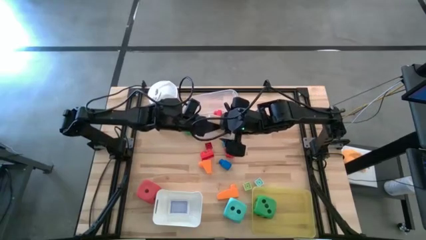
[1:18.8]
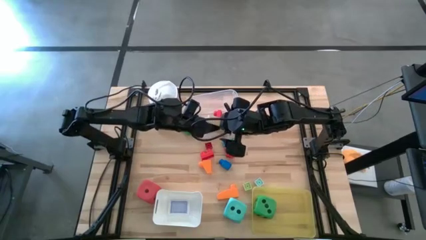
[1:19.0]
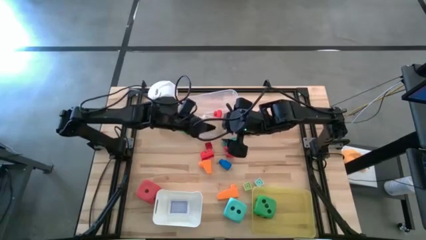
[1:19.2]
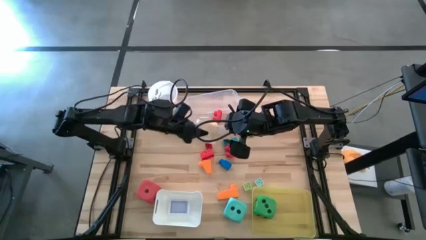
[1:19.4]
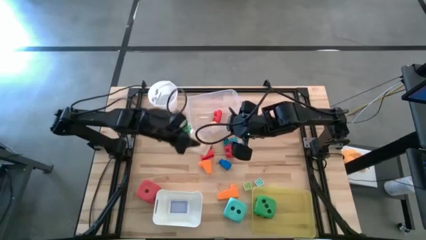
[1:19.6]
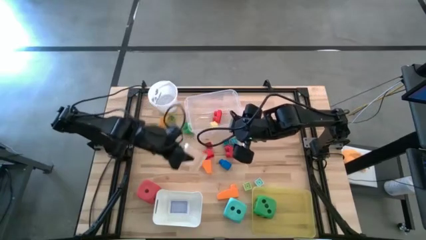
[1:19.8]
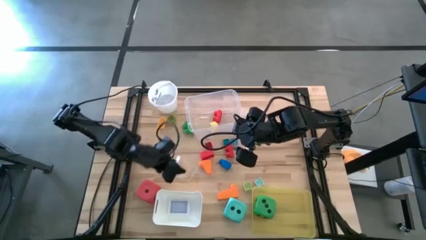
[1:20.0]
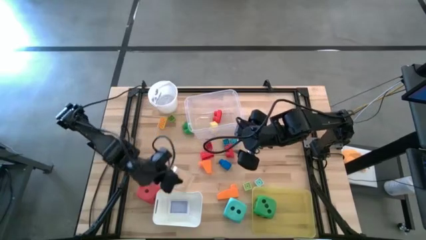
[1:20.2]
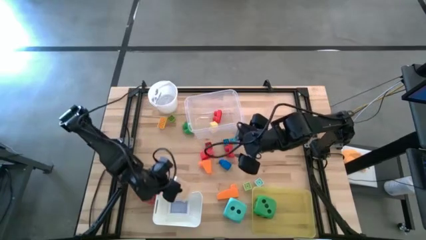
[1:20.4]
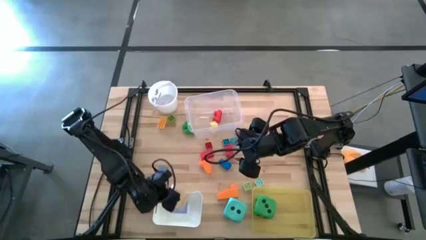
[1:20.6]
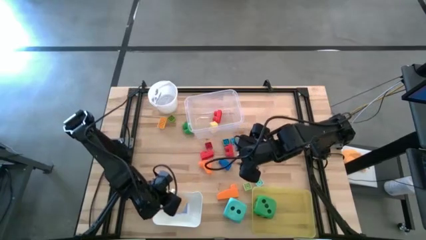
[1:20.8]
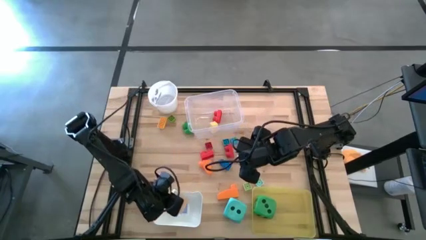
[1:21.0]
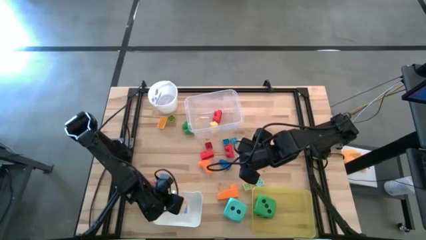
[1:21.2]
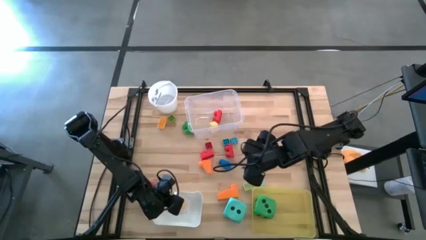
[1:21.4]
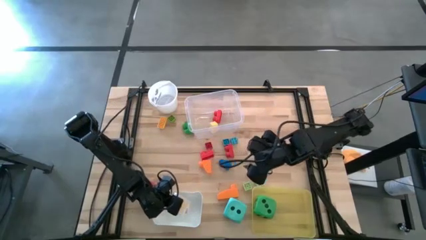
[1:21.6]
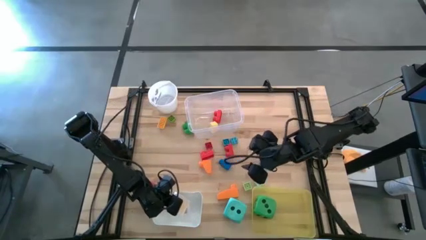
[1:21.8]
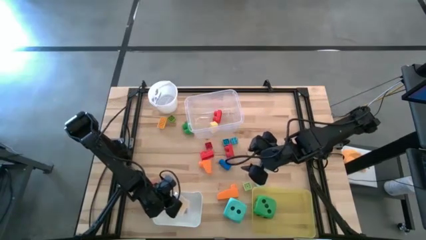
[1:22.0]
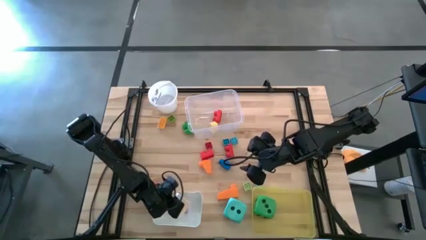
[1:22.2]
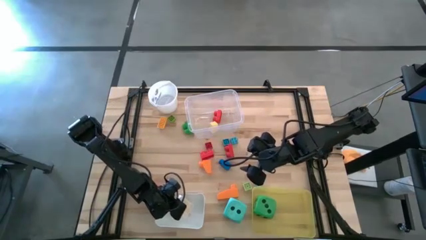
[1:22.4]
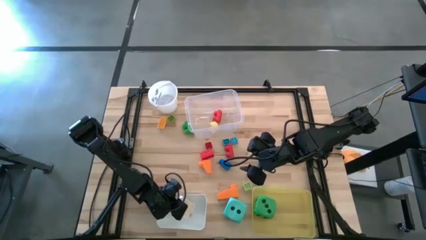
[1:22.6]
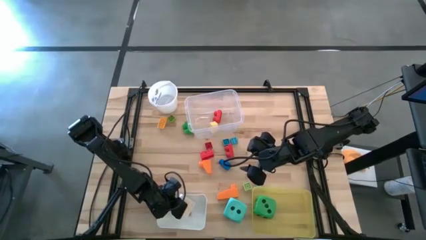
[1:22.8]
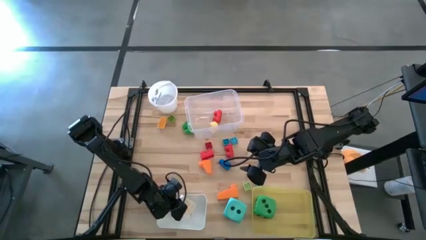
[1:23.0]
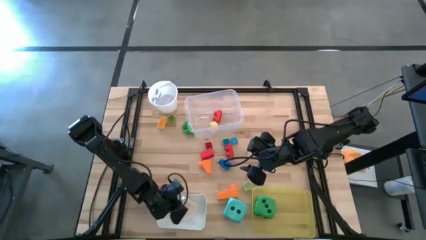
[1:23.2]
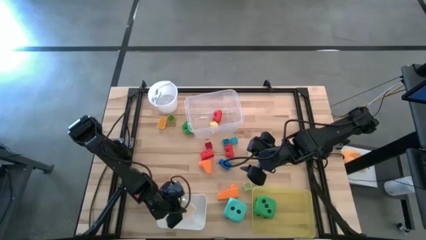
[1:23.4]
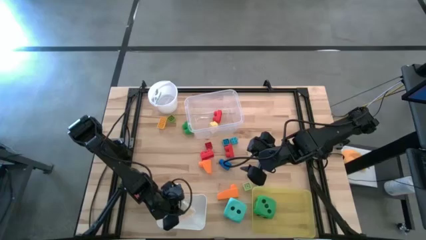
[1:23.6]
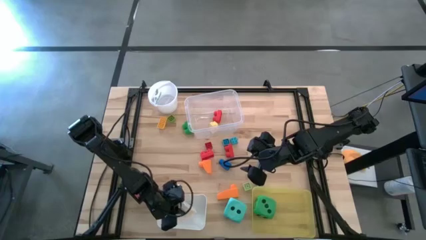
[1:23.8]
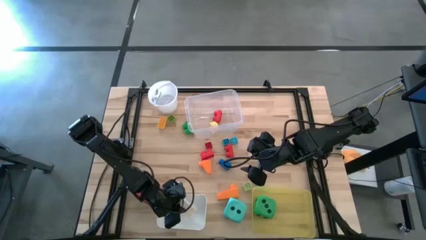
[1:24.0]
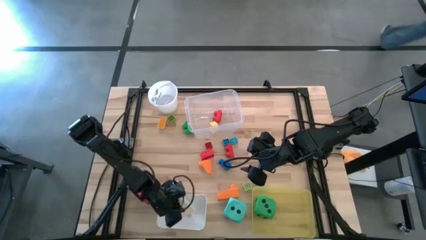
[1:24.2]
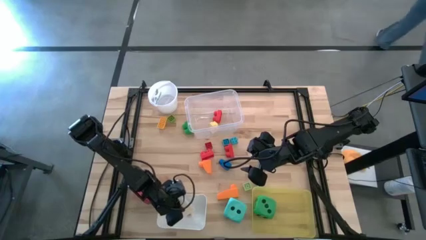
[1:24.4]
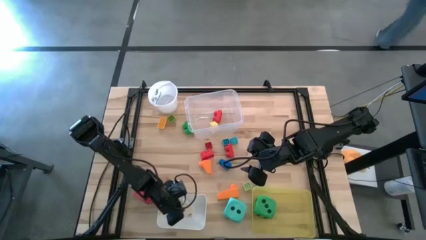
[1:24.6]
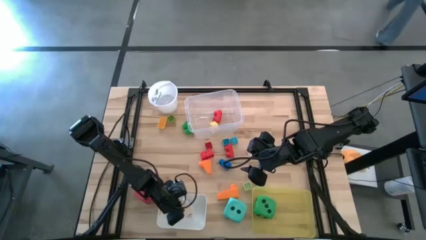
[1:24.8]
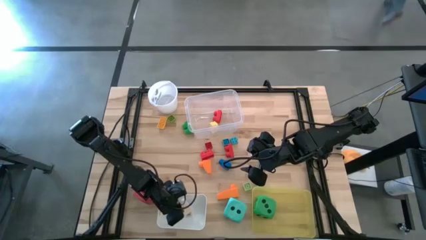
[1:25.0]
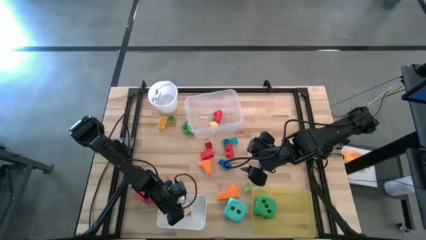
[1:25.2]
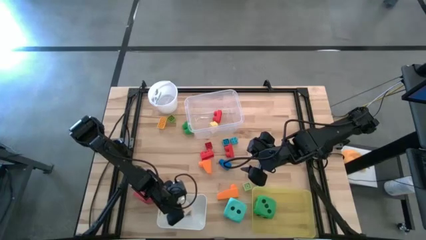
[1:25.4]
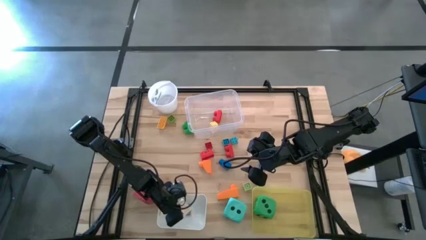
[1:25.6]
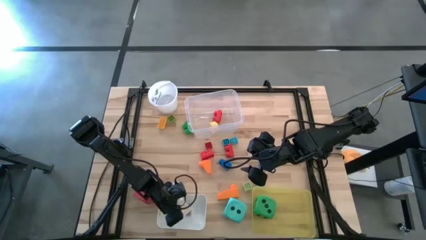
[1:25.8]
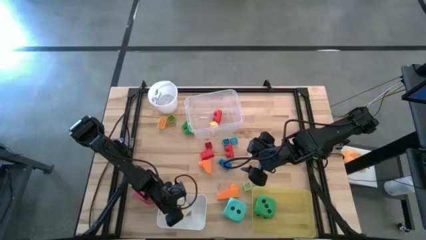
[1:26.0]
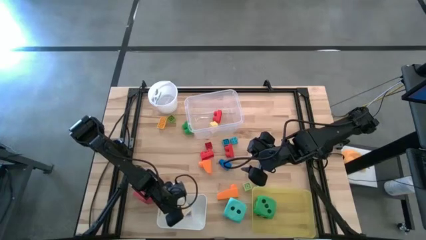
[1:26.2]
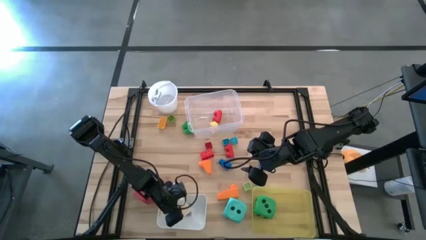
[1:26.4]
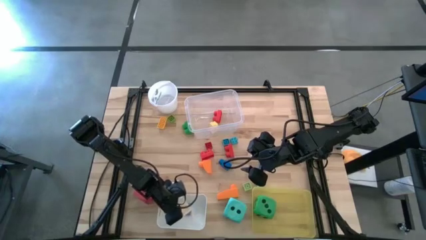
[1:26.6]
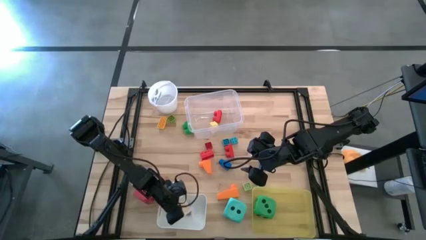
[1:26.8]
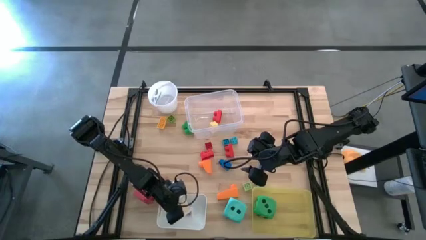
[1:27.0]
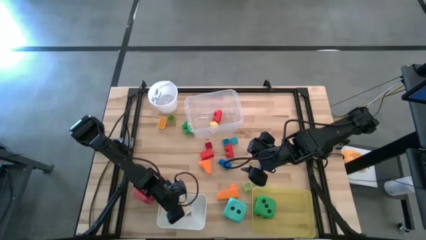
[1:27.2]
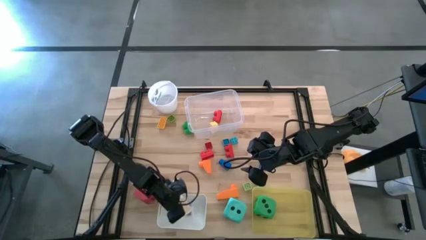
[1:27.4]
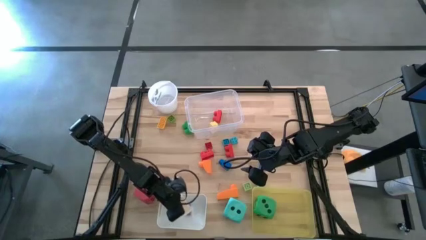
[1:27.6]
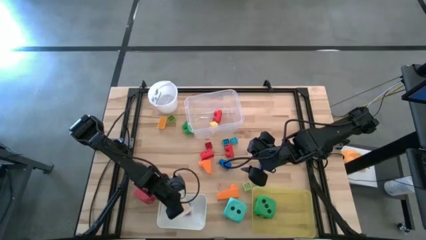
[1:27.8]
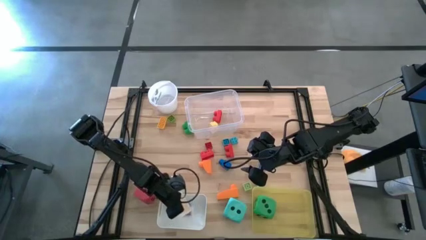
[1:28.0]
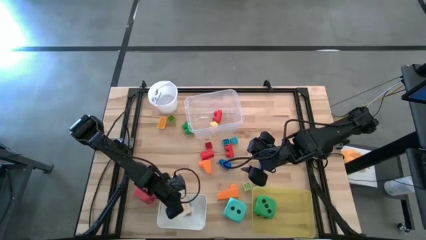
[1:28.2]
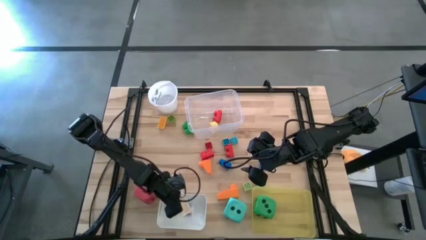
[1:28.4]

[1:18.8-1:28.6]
Task: Pick & Place Toys
Put the orange deck of cards into the white bin

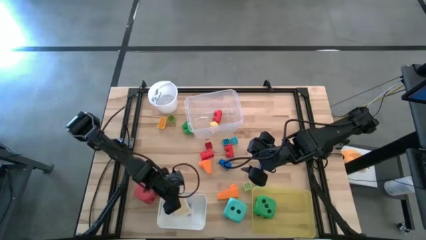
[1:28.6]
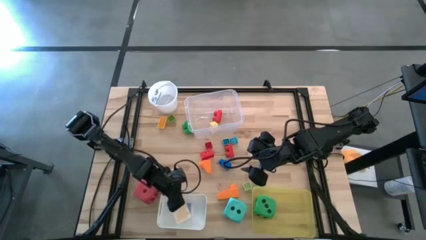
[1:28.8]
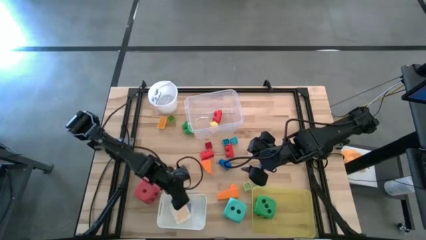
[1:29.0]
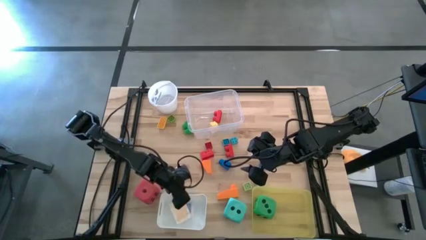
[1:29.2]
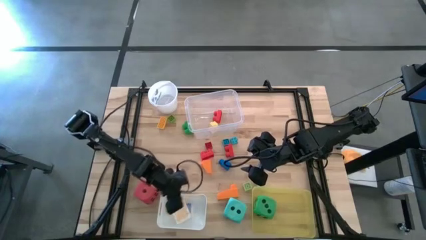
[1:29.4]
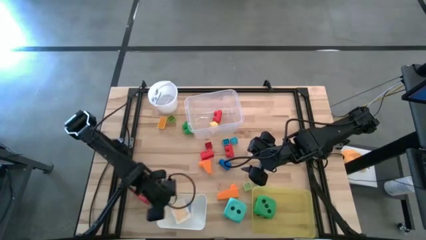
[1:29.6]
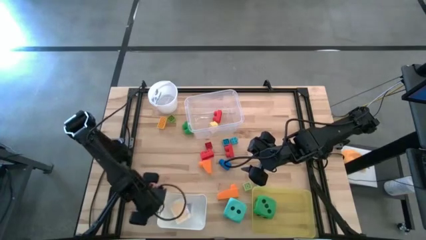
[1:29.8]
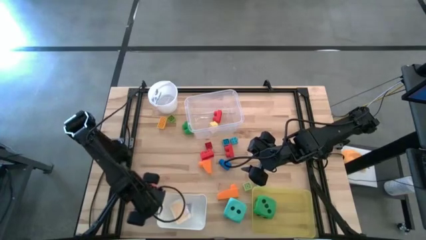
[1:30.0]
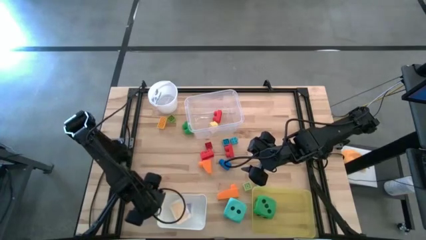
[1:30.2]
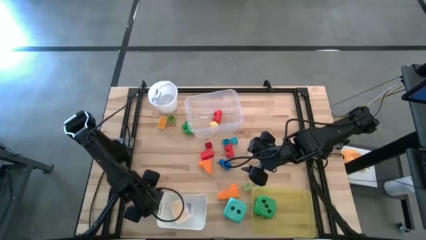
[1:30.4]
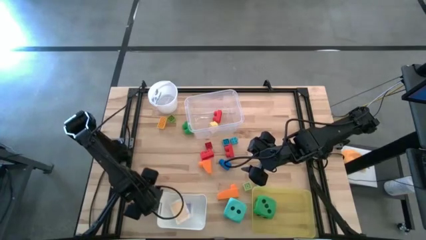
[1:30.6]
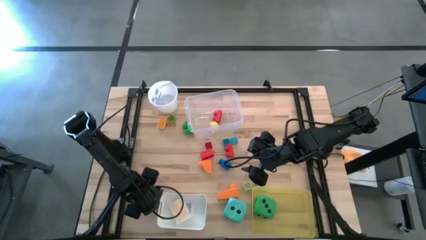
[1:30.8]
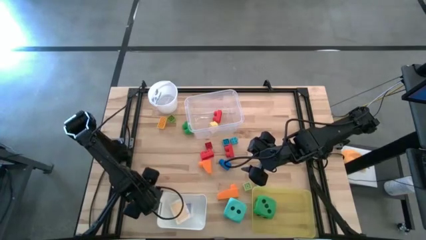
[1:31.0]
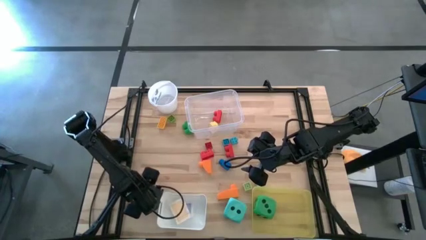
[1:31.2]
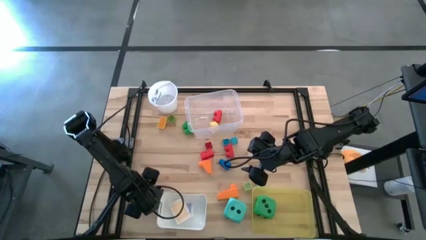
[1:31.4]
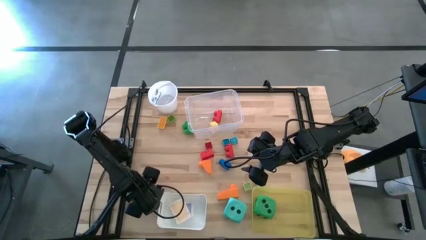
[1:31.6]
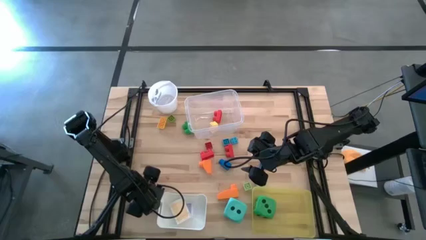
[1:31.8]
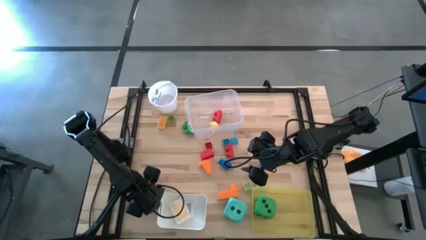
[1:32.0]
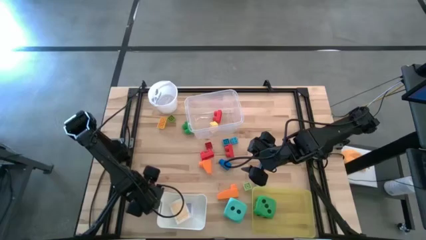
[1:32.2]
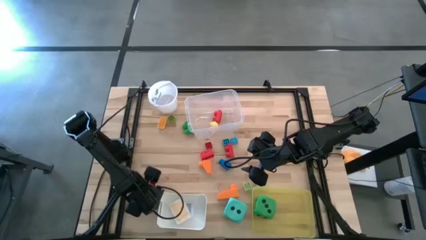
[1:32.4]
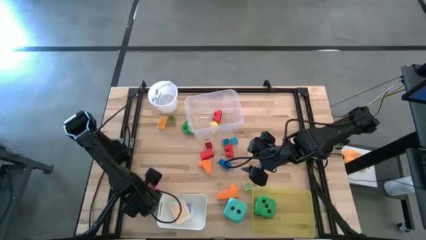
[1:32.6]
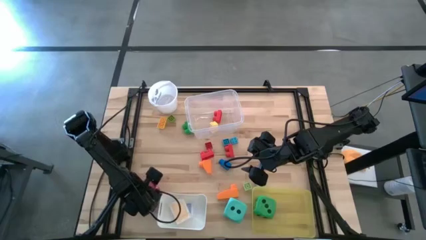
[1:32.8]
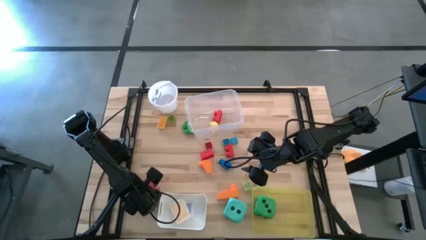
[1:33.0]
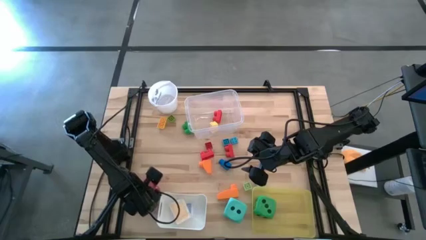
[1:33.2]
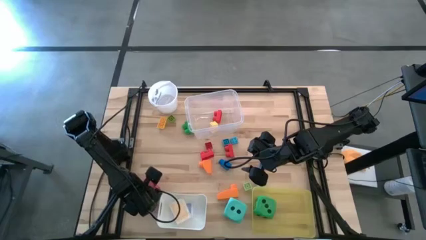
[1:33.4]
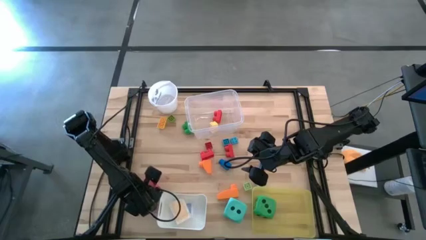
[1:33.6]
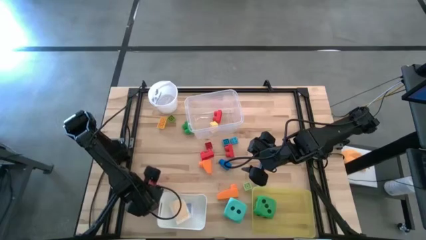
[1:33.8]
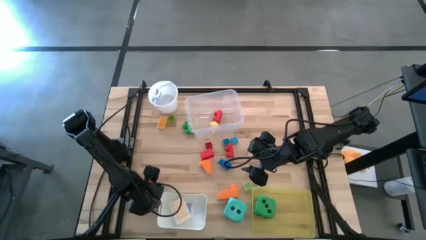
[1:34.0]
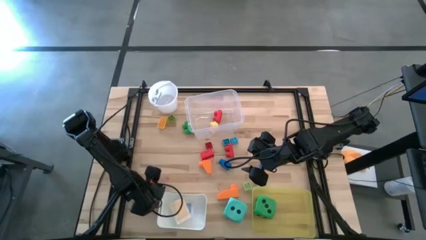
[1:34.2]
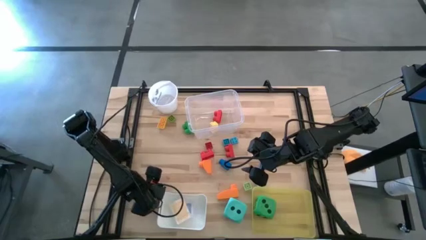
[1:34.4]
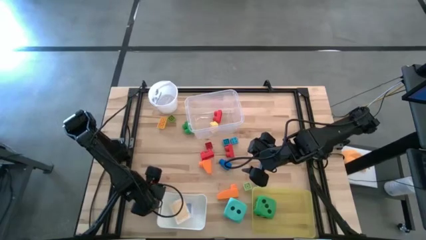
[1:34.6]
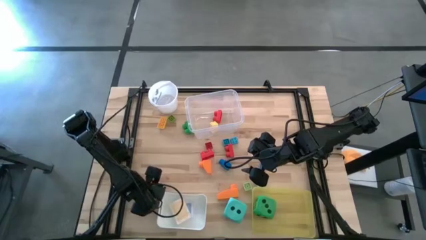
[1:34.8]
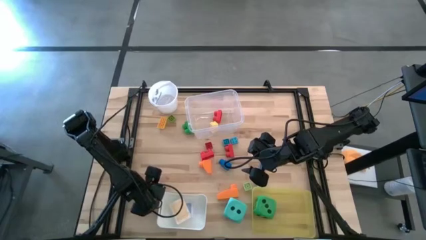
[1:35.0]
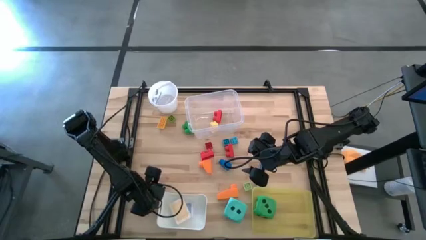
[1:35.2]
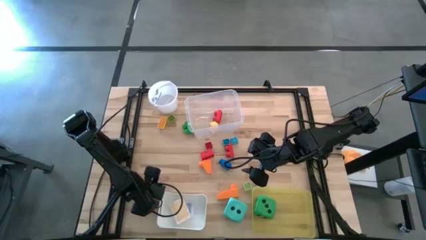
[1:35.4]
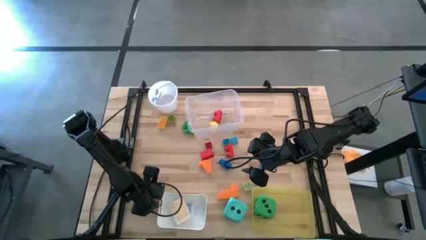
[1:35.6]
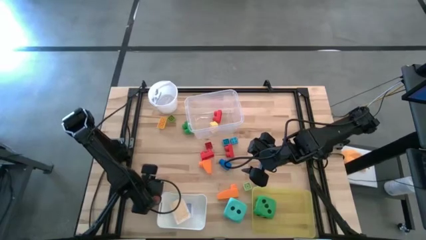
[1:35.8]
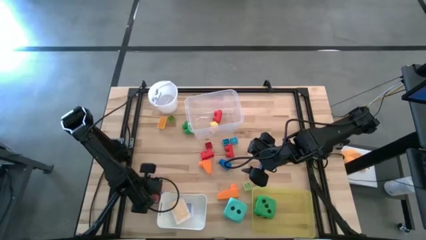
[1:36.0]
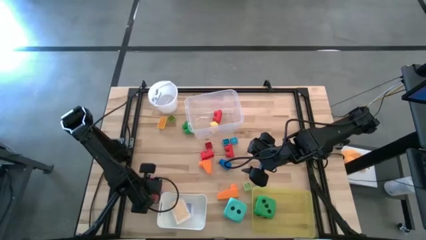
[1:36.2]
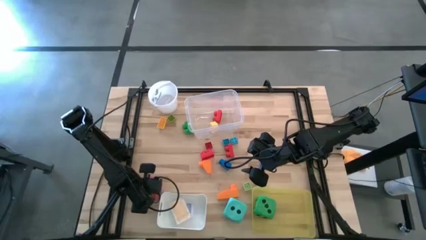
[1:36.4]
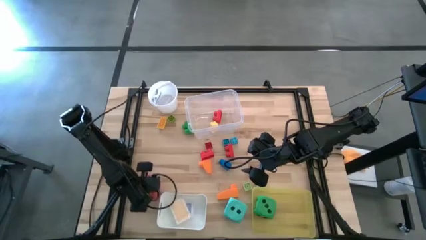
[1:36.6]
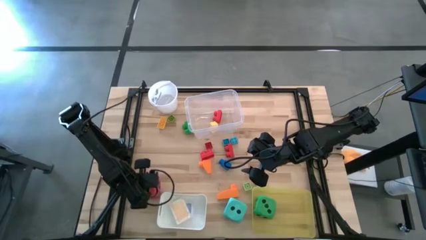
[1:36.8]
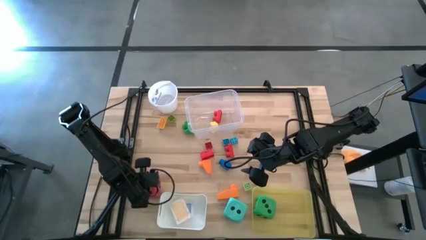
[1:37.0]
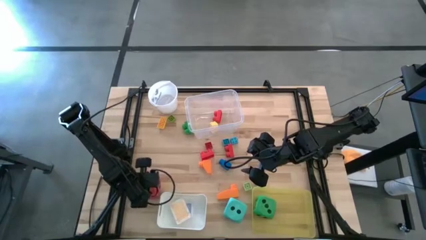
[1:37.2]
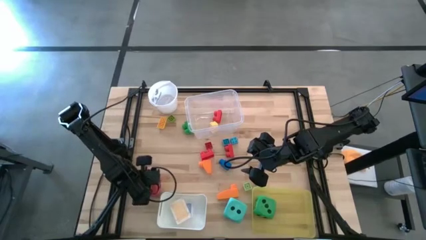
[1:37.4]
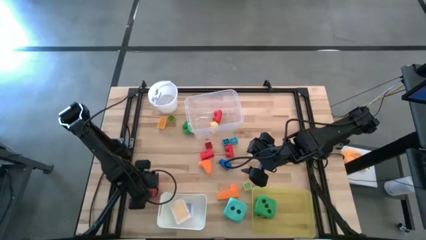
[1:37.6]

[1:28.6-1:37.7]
Put the red dice into the yellow bin
